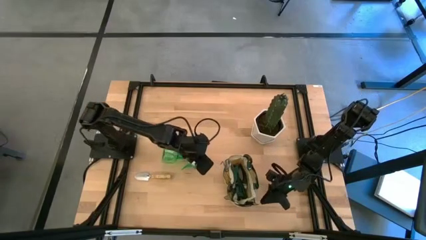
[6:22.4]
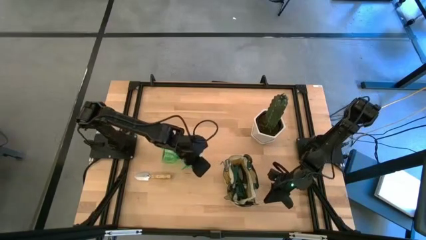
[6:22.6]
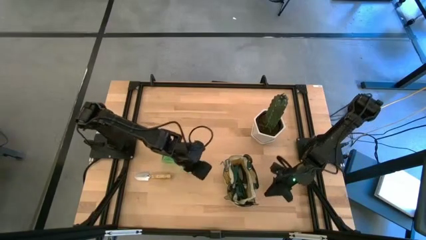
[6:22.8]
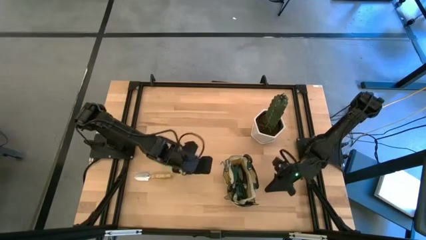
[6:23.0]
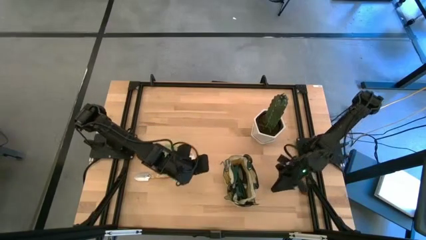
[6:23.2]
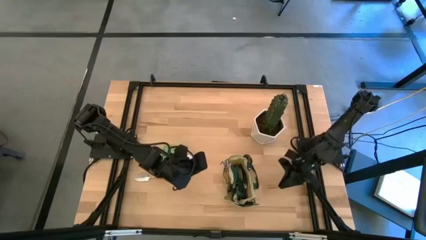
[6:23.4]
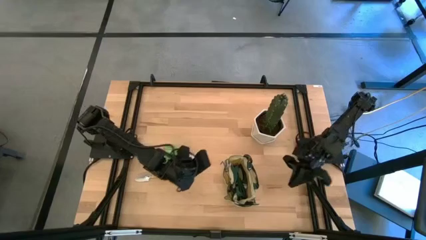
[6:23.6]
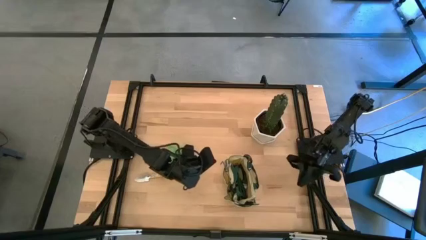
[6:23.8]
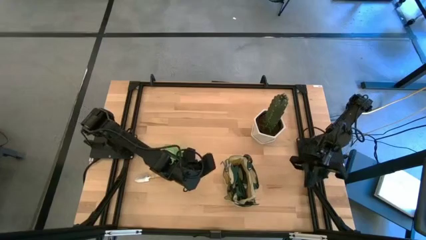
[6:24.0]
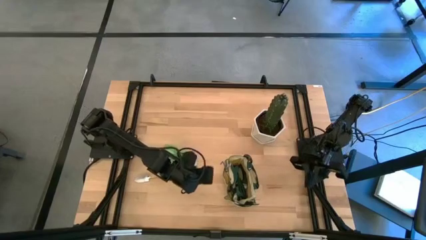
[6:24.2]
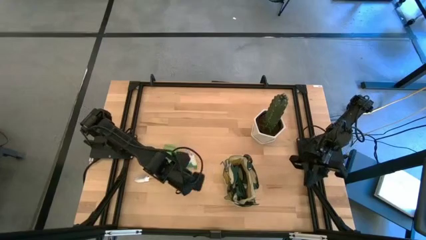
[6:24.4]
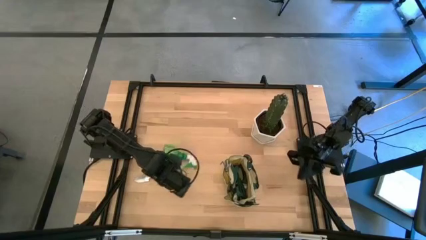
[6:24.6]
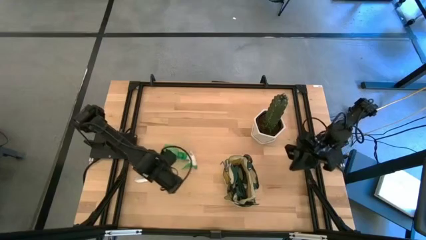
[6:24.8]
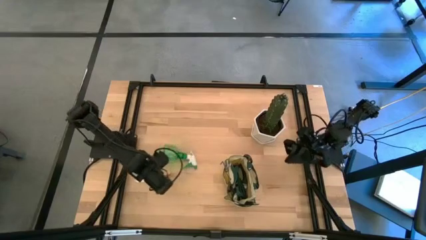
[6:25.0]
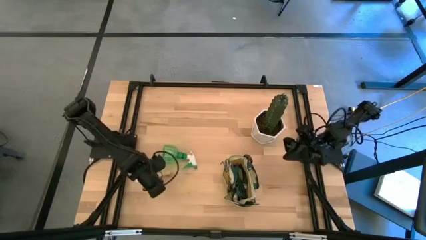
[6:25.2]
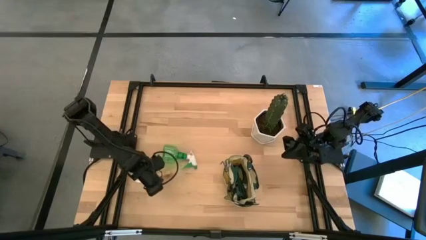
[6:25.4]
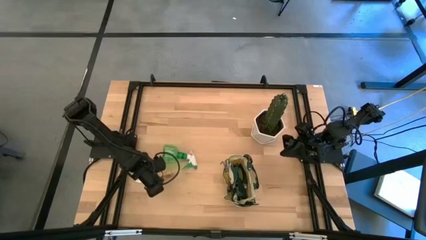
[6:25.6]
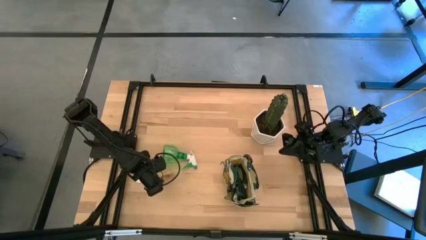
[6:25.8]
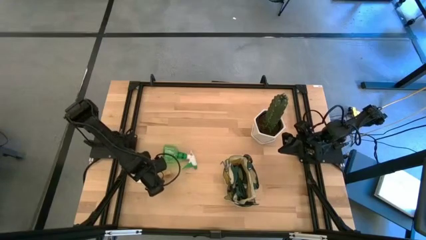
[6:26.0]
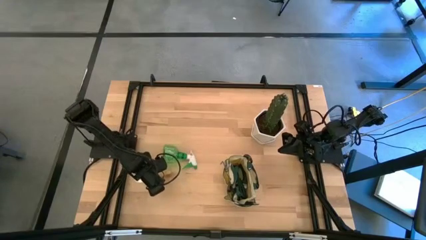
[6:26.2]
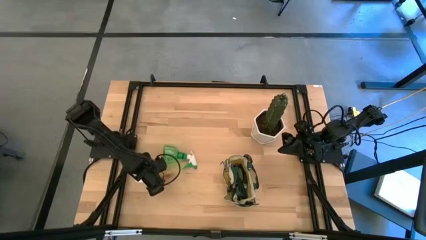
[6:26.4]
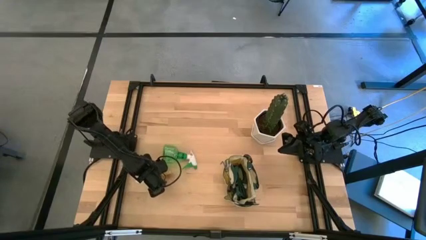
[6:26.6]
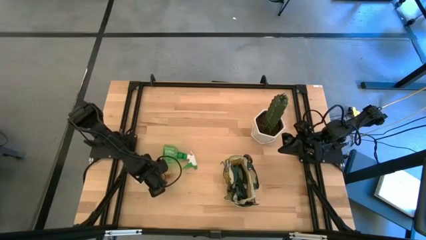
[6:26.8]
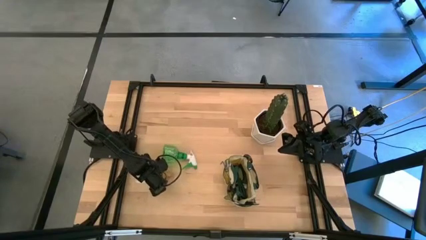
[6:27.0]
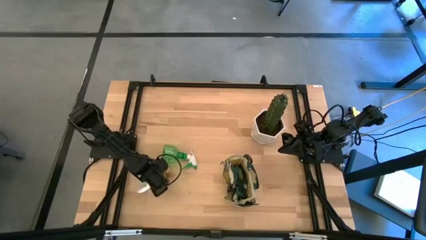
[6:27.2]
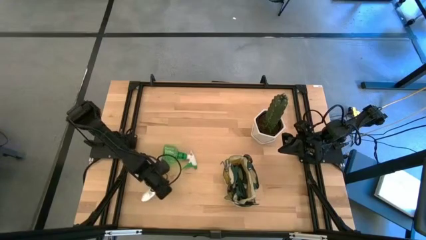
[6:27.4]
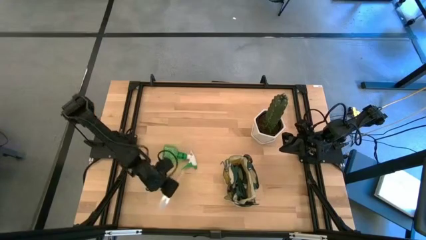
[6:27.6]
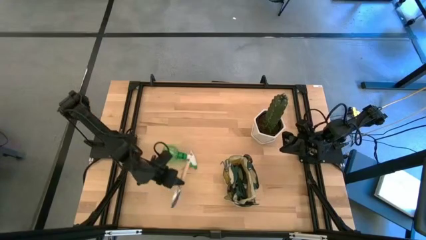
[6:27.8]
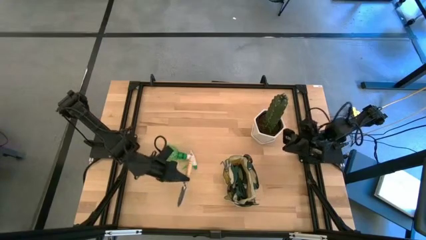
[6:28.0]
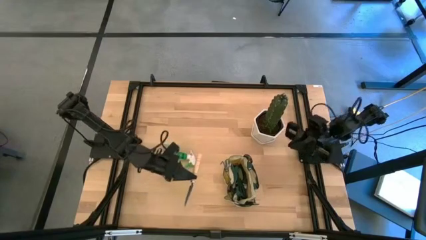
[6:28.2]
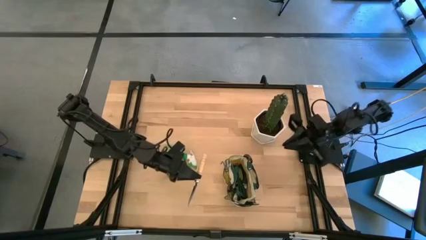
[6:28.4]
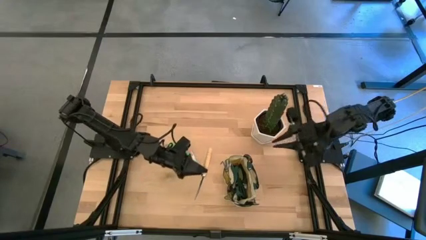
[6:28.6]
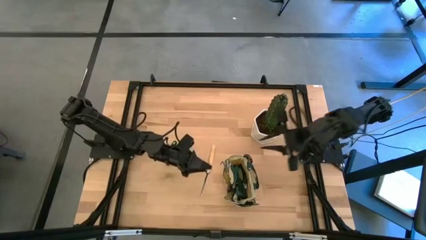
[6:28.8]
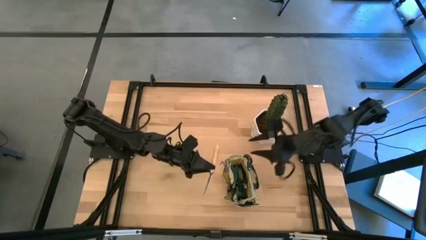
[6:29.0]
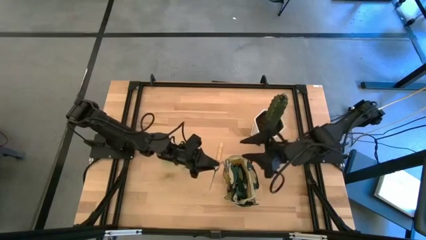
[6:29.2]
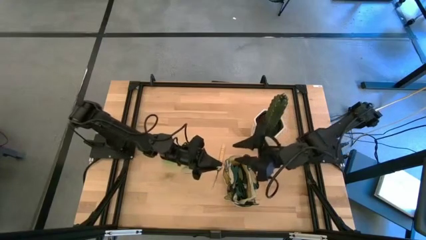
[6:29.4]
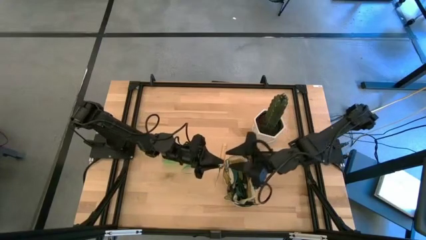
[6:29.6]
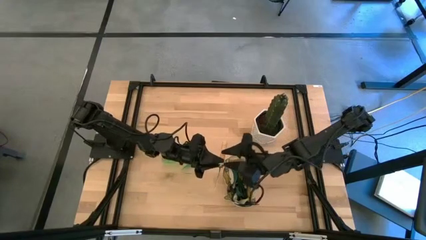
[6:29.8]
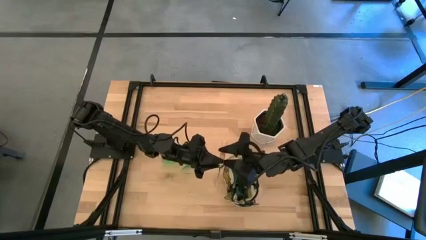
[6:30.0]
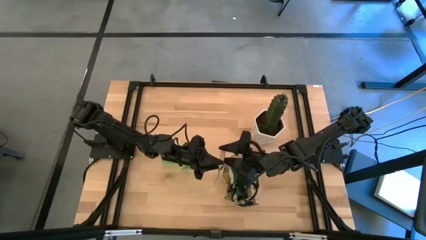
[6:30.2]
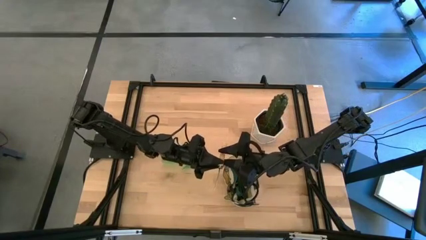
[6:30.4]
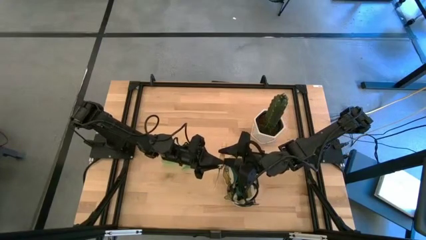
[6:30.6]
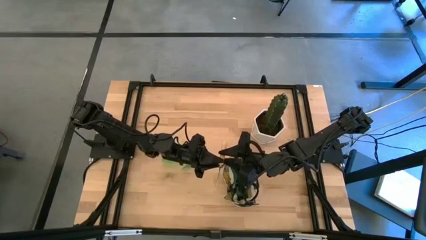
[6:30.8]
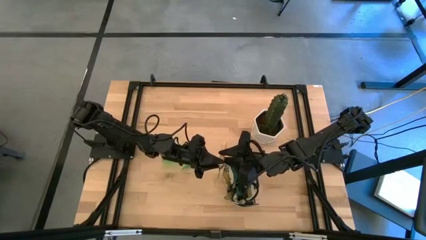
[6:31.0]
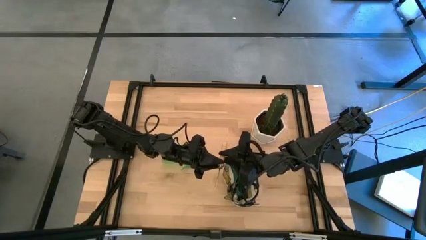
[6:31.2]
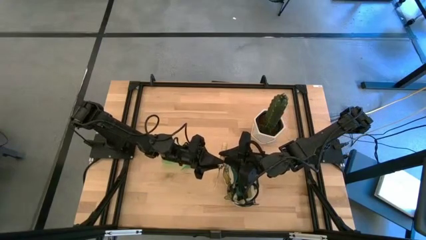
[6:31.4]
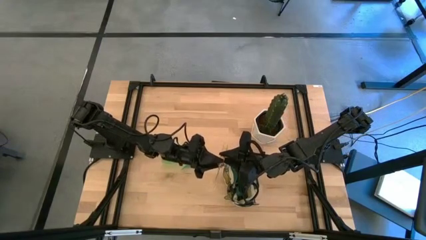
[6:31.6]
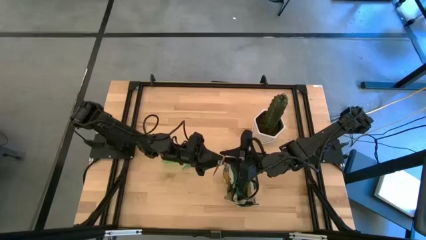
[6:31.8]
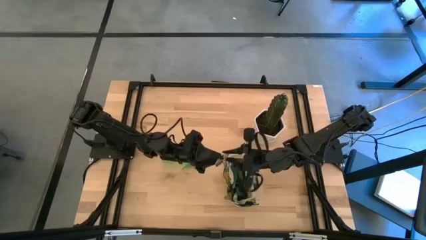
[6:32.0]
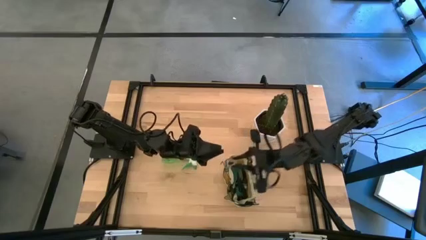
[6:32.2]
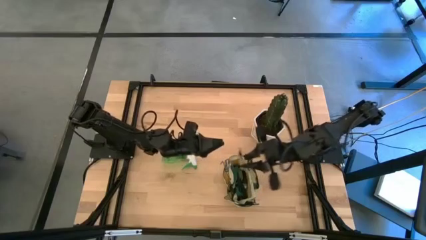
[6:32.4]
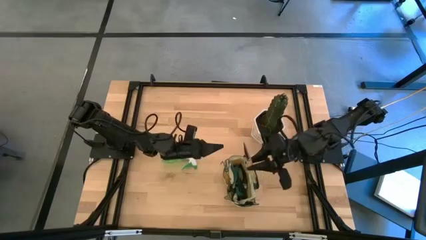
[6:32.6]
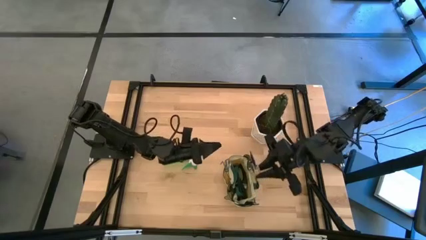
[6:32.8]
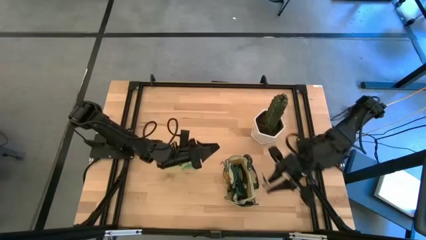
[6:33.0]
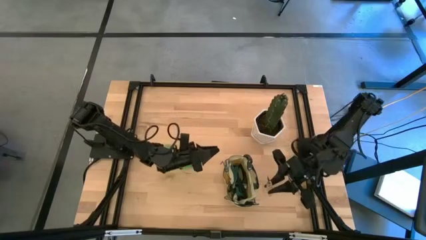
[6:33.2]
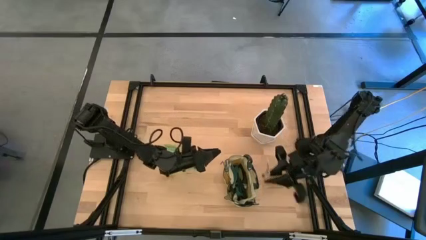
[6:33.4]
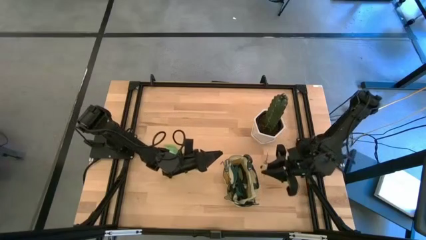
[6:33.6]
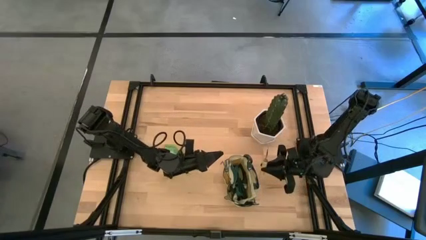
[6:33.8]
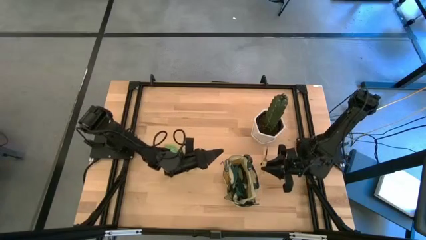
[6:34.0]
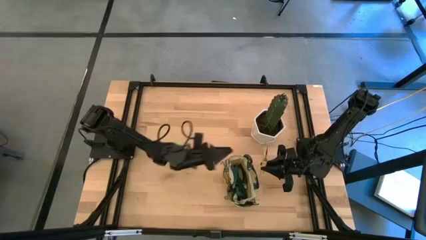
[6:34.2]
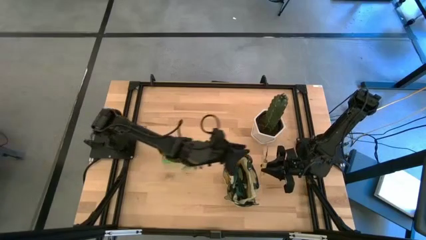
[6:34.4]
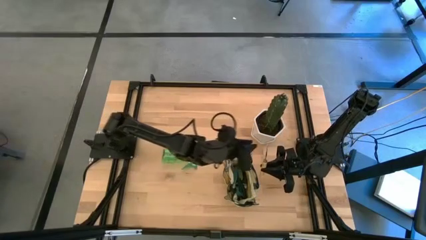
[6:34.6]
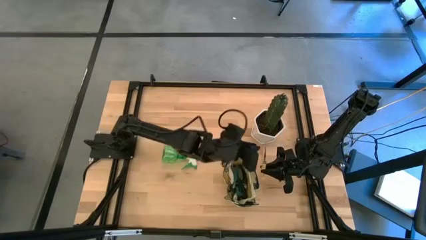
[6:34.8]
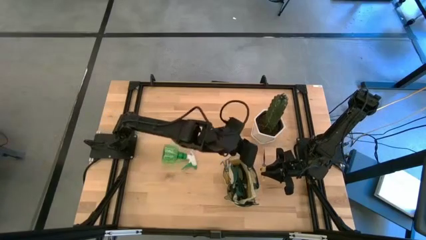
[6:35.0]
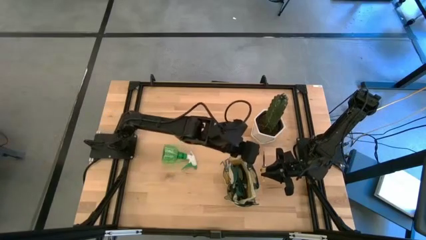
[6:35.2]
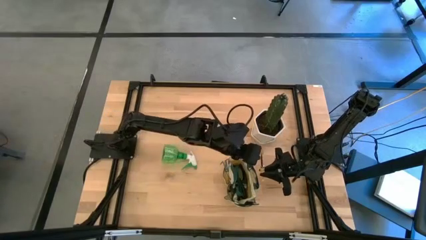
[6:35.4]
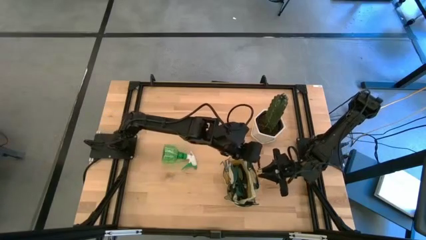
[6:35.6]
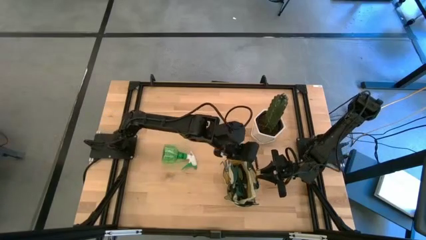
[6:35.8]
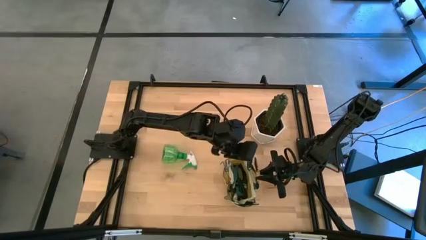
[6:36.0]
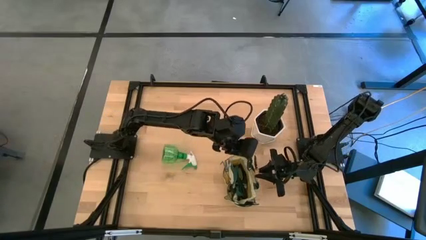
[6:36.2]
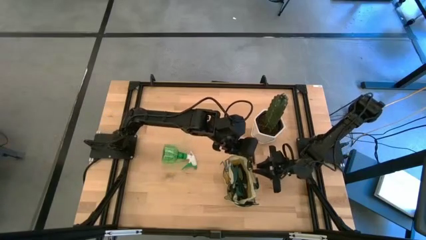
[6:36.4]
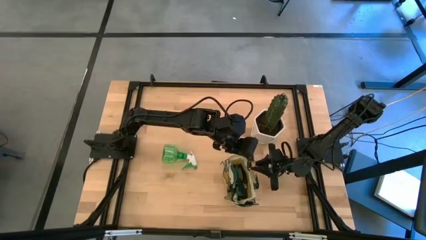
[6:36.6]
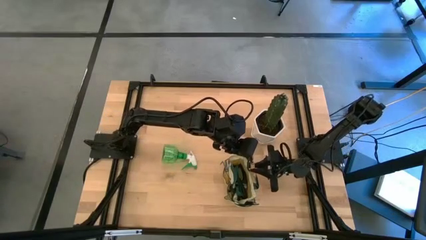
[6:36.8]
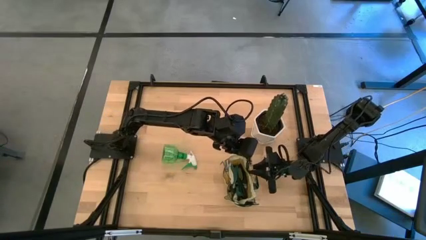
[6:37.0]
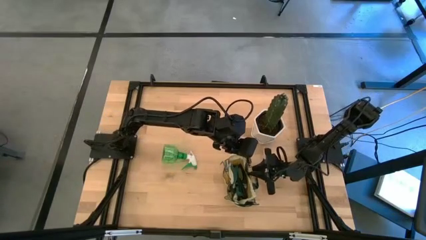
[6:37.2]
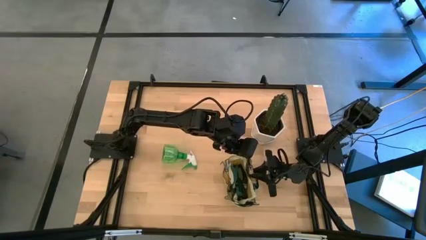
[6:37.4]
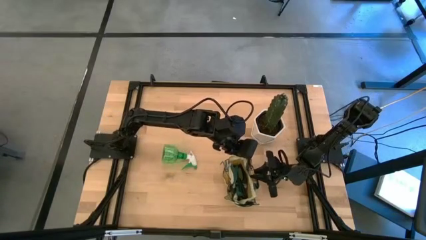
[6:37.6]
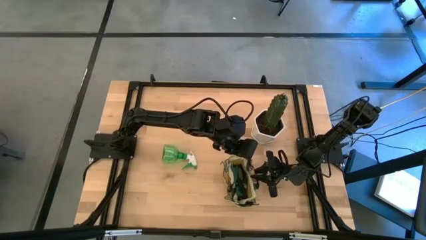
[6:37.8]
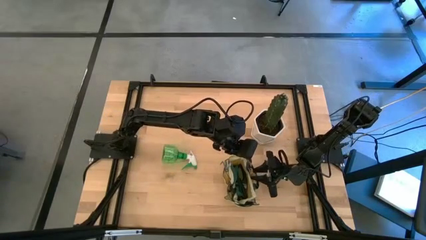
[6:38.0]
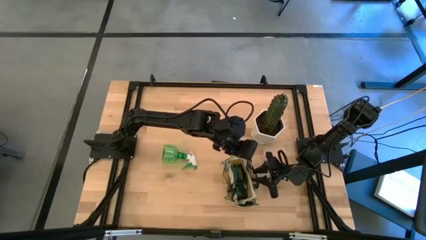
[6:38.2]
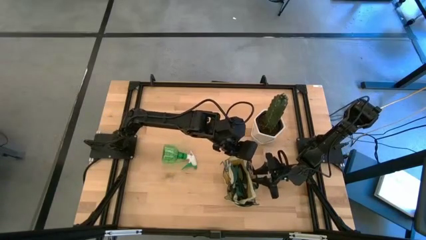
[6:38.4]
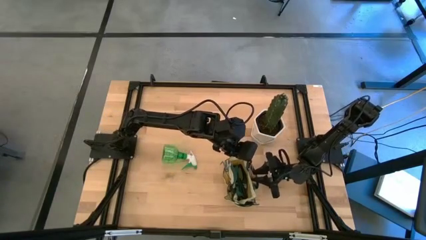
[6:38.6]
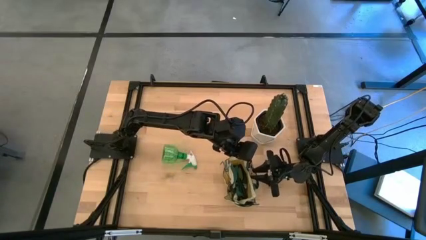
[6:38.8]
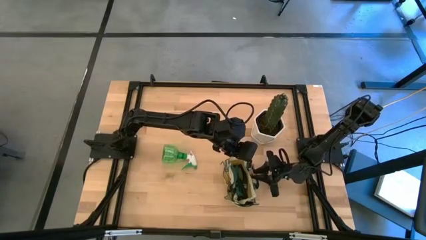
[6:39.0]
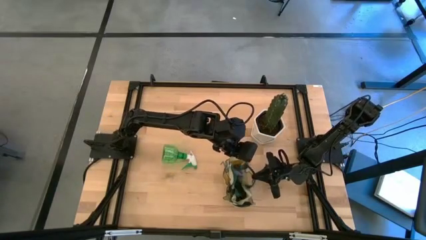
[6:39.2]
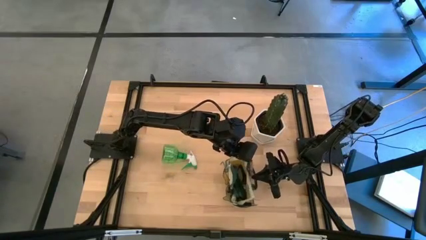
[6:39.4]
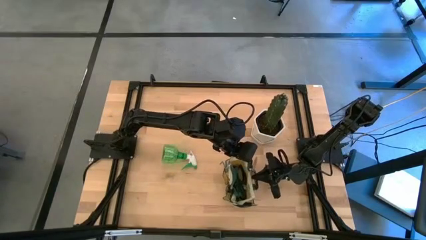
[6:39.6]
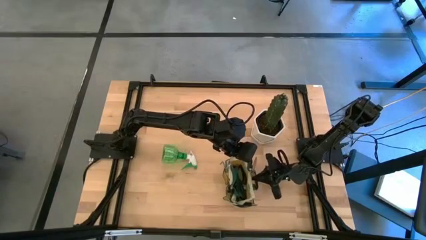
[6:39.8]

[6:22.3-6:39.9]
Task: Pick & Place Garden tools in Gardening bag
Put the hand trowel into the side pocket of the white bag
